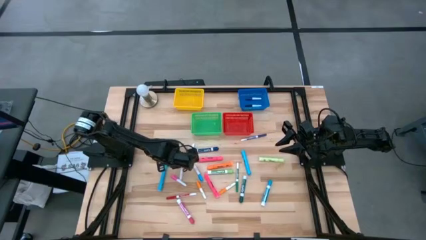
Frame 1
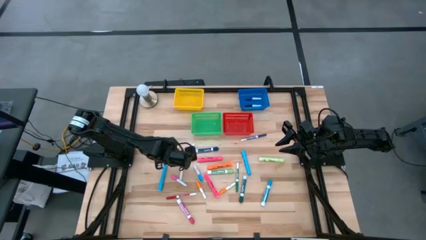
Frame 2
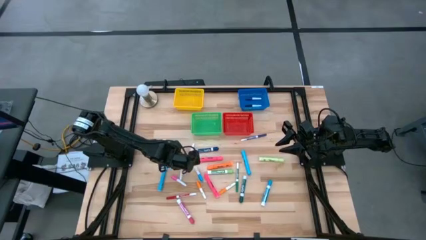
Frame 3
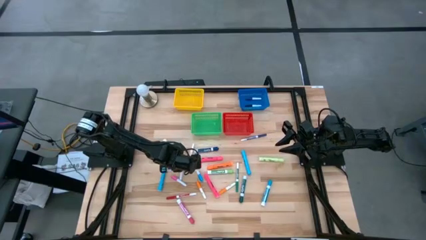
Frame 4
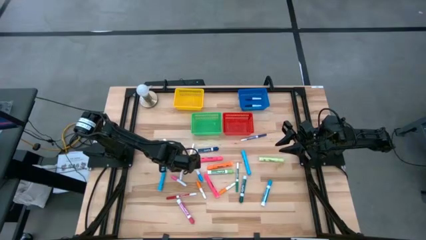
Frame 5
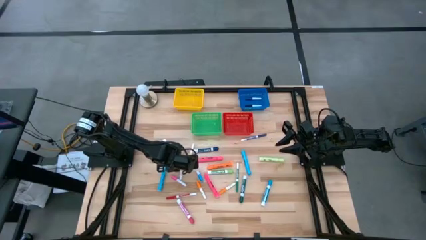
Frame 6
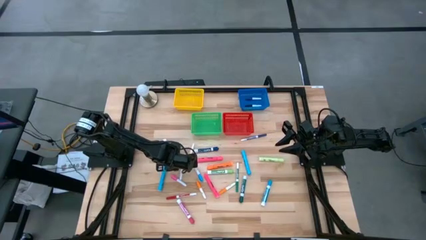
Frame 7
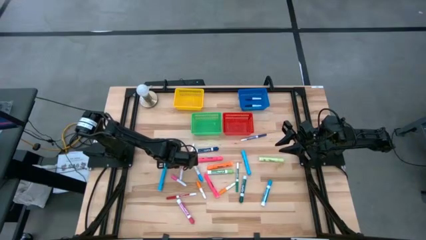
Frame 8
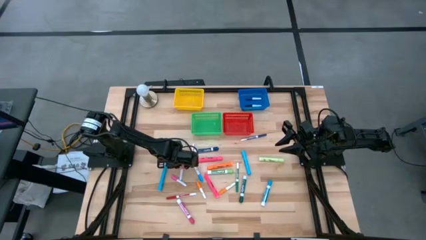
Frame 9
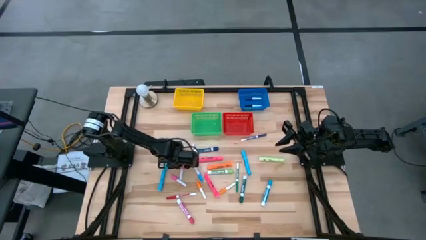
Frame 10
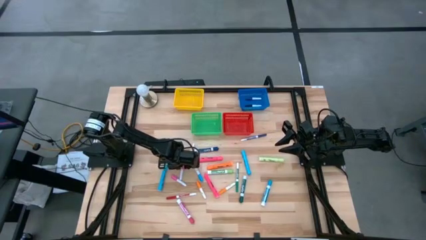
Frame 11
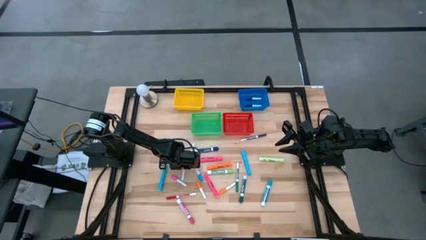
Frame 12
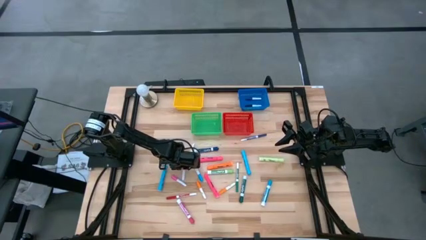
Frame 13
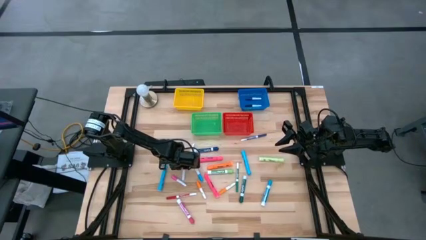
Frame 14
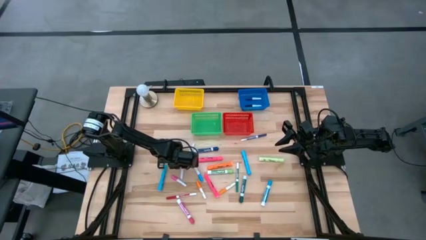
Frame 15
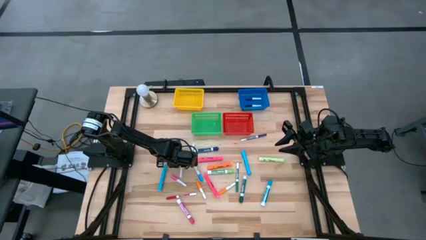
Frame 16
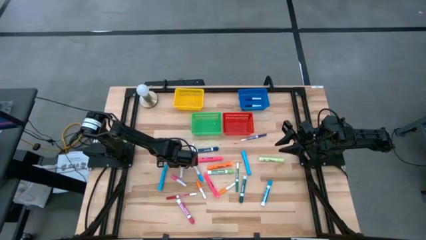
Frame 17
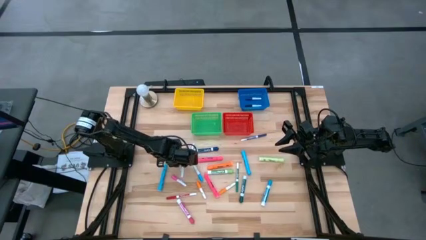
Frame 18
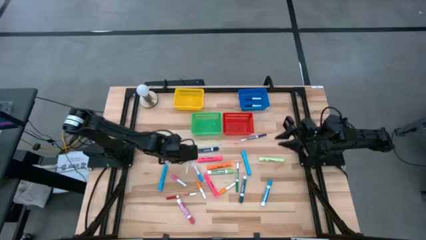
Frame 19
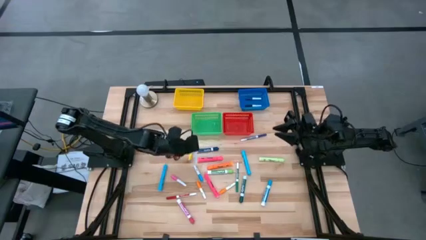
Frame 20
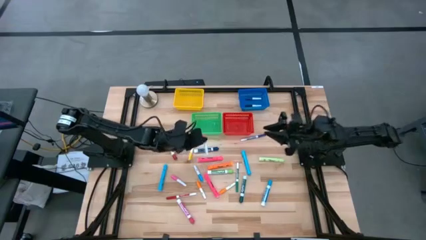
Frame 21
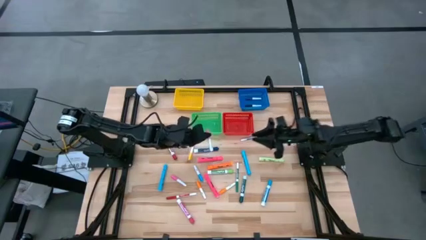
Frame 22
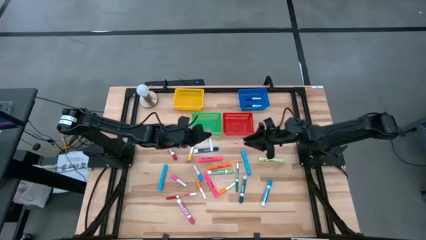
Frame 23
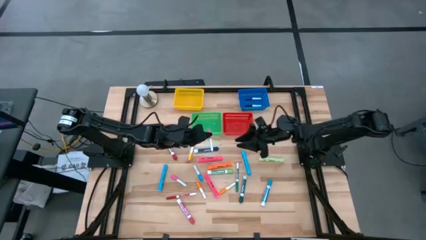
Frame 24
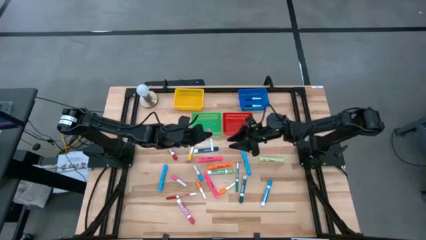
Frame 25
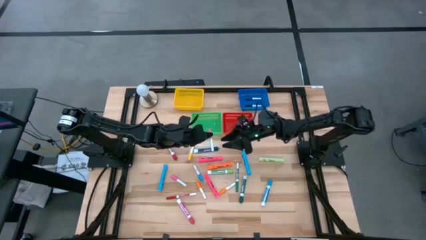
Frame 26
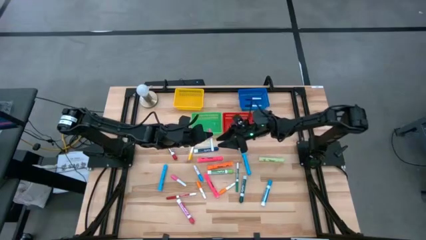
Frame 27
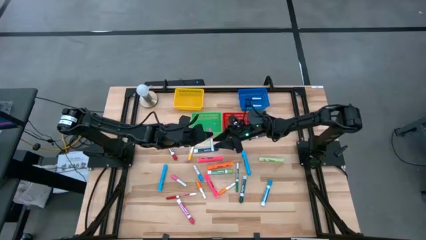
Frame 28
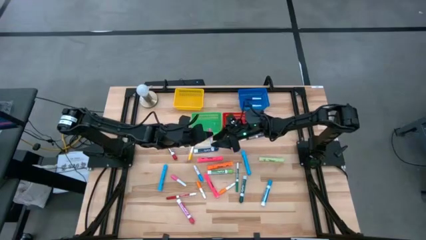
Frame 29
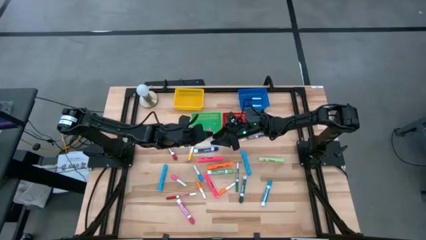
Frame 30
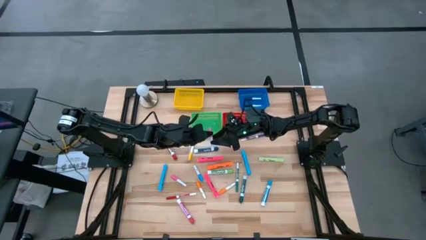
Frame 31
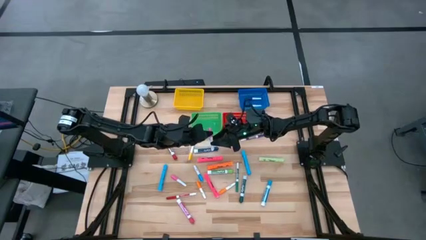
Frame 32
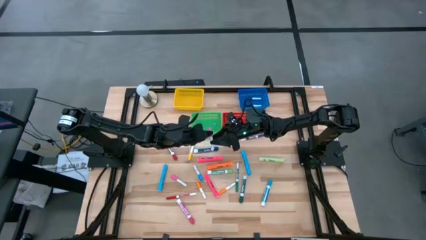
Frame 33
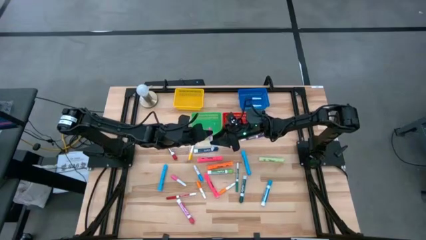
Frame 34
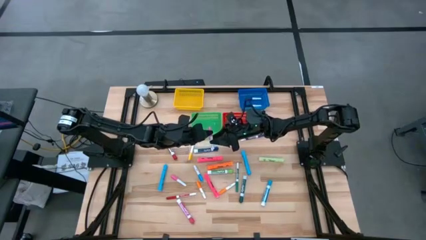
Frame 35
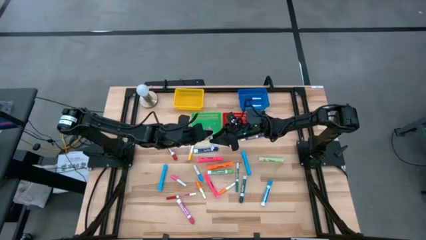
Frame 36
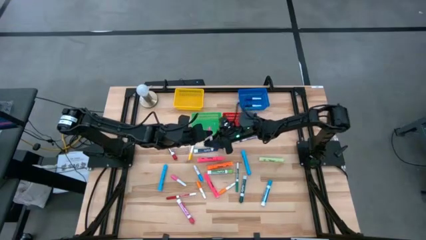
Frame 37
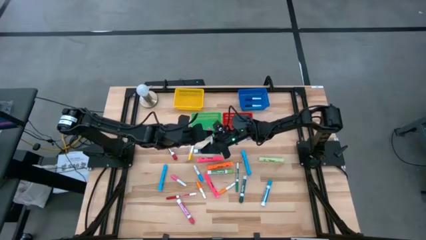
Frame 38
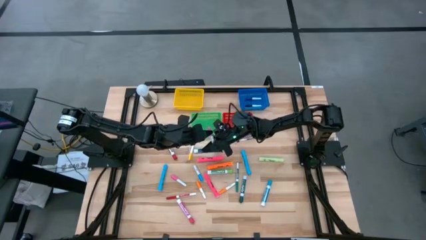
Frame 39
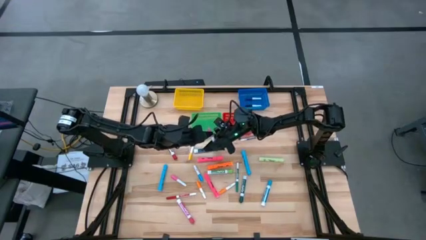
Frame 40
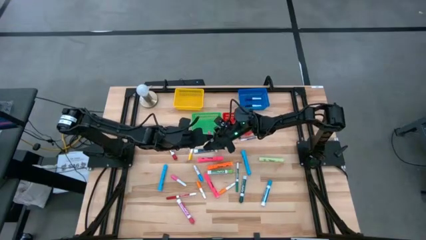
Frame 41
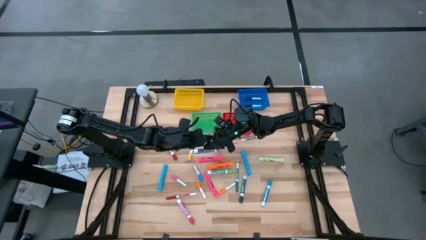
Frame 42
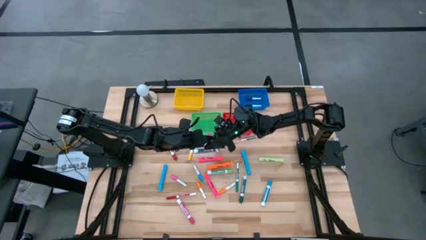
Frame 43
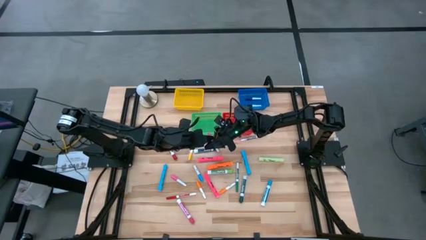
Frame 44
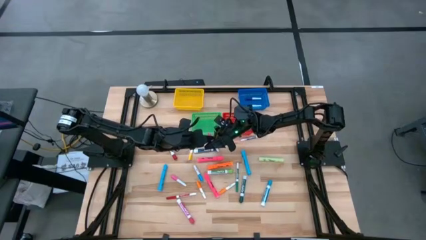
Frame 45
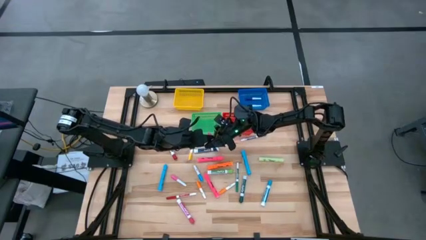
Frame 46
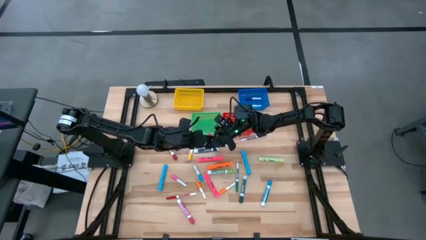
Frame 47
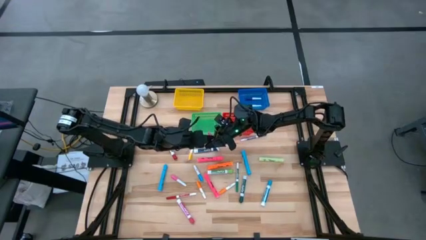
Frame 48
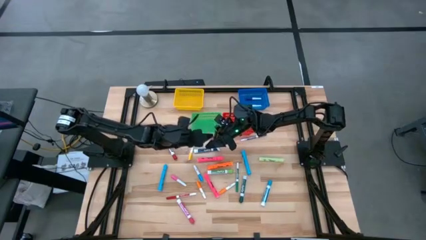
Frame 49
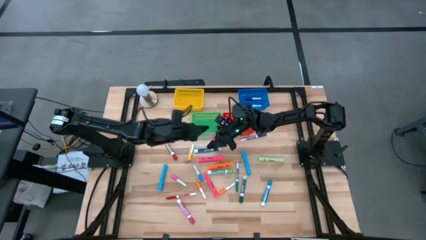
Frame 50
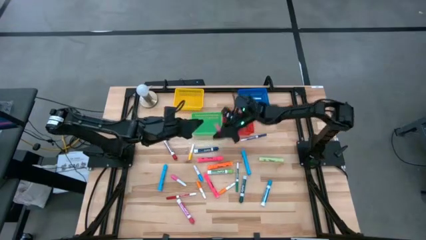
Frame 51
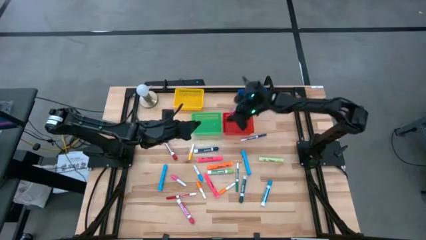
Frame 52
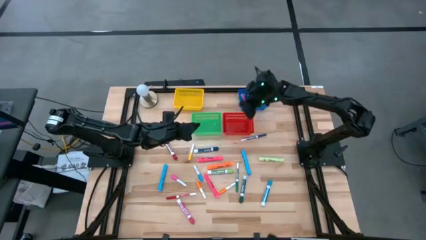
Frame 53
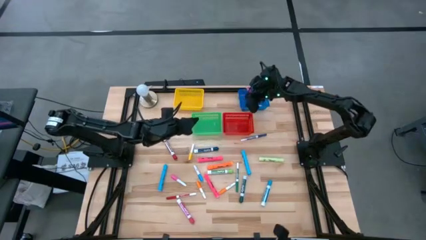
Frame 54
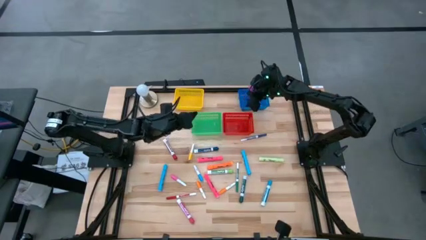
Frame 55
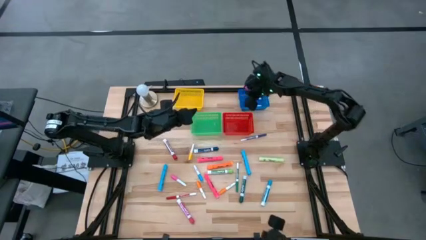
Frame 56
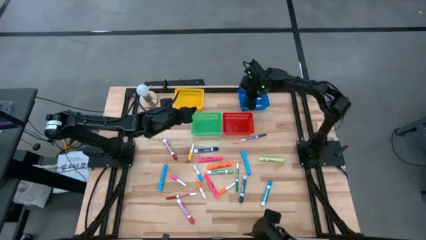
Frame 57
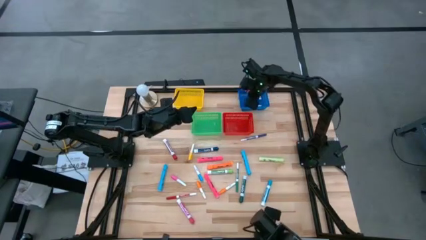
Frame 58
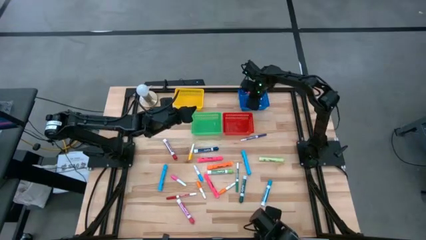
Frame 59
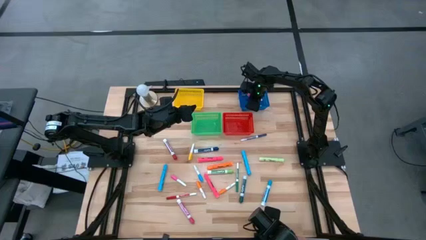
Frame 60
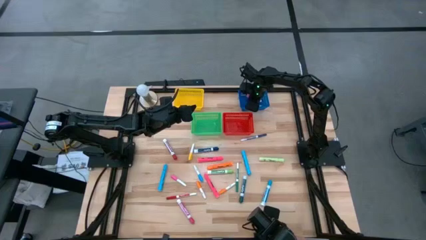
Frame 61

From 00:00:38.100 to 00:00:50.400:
Task: Pick & Place Markers
Put the pink highlighter into the blue bin
